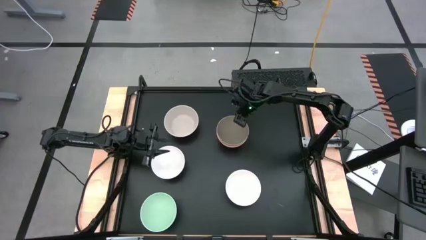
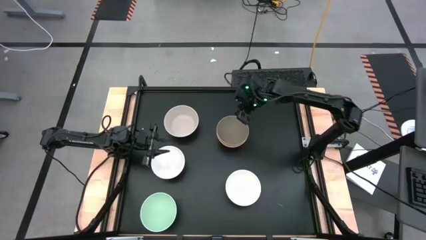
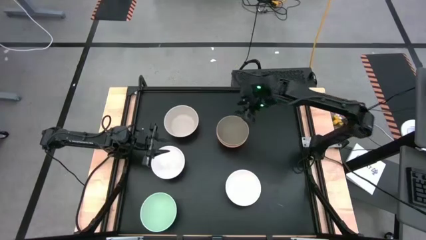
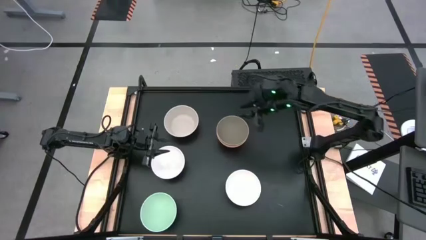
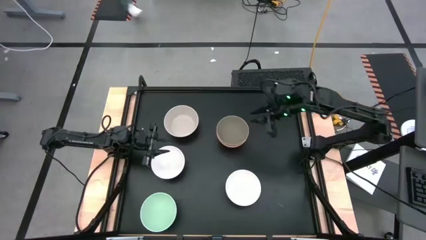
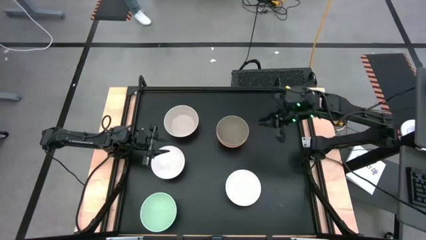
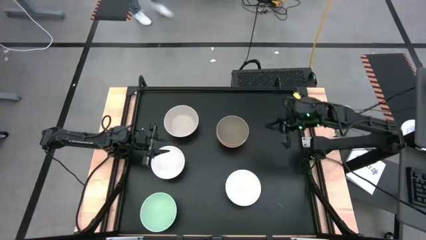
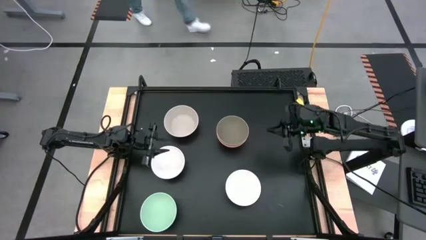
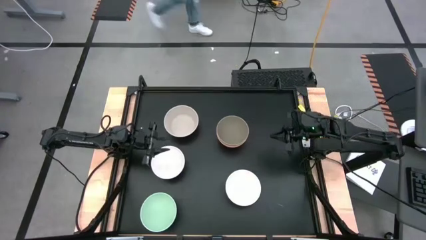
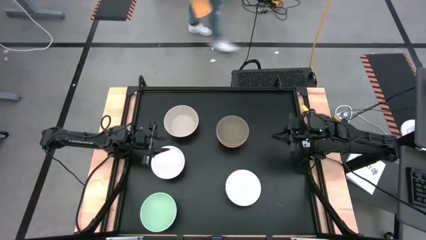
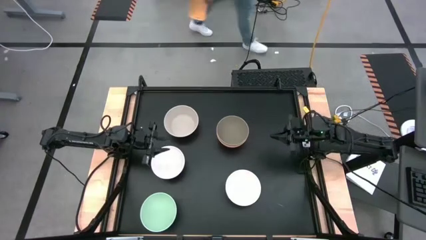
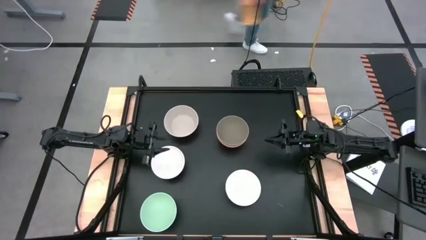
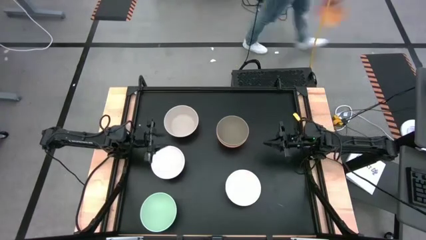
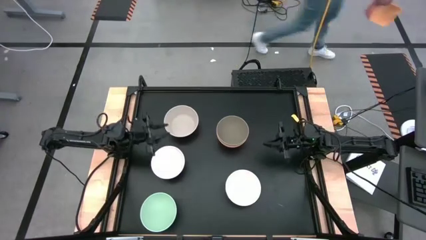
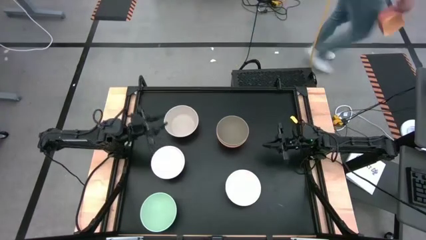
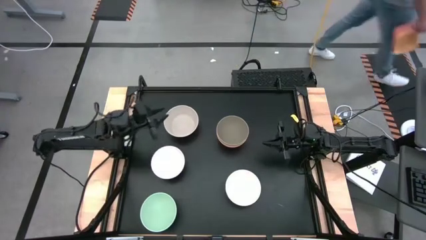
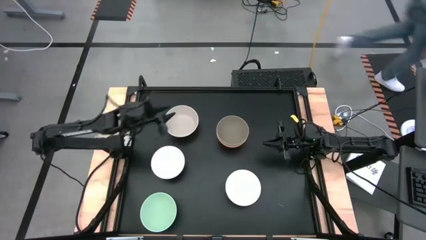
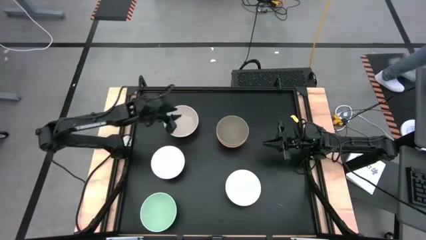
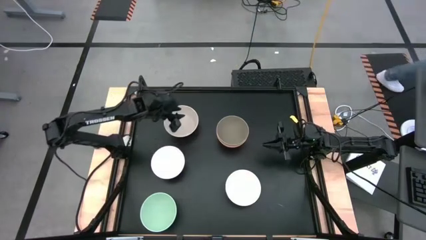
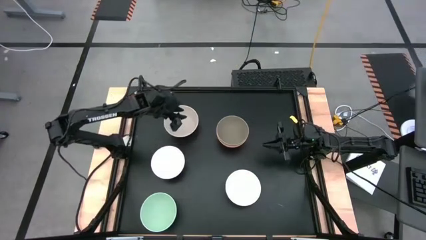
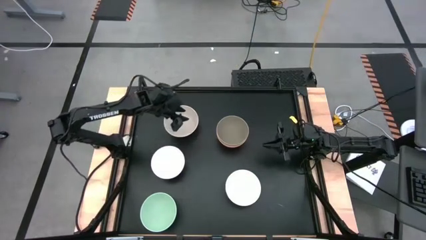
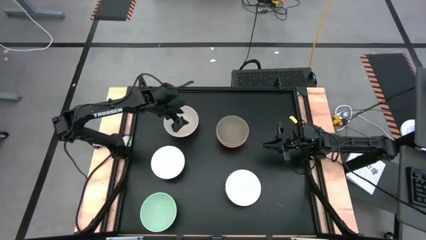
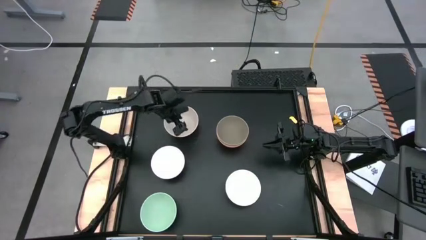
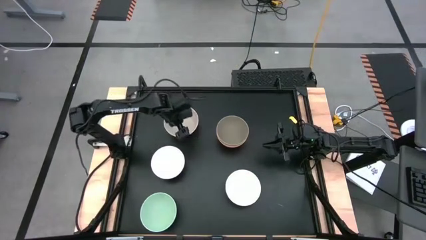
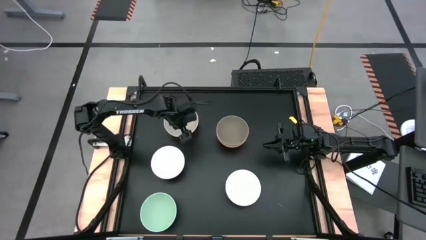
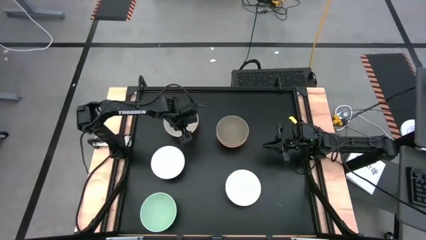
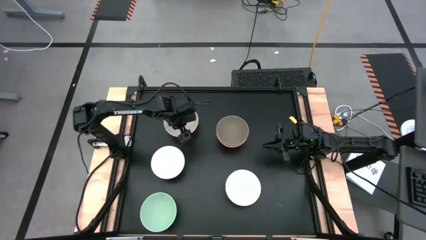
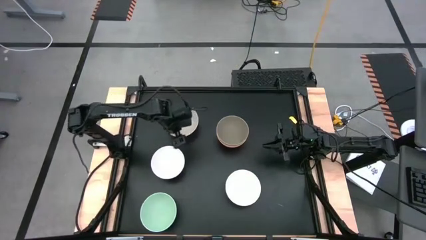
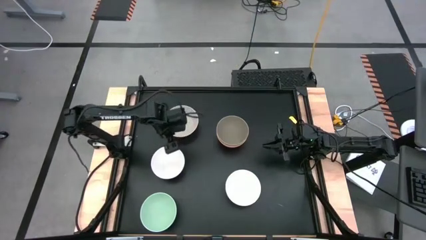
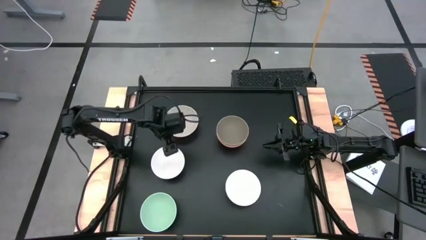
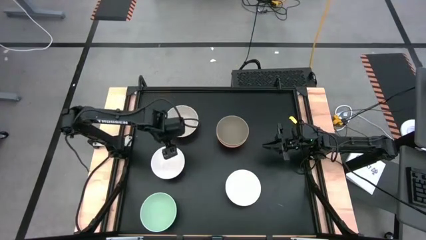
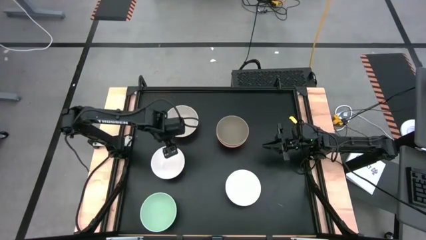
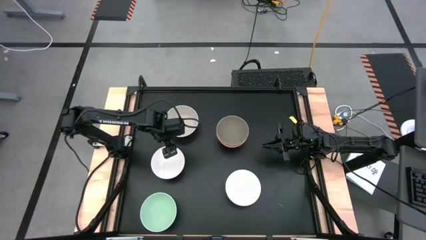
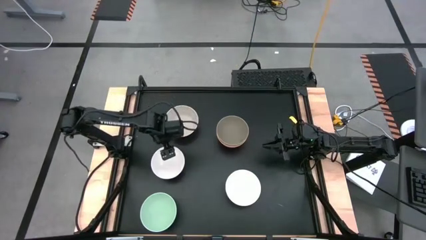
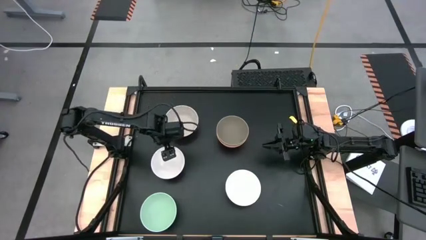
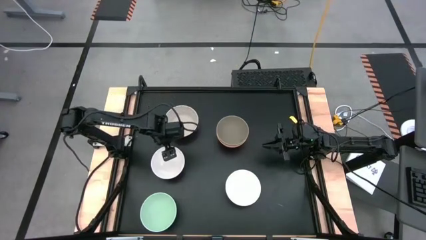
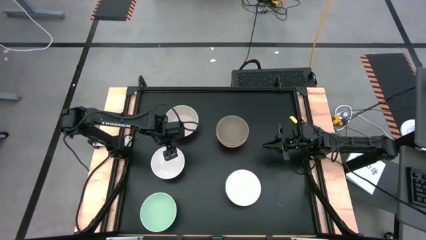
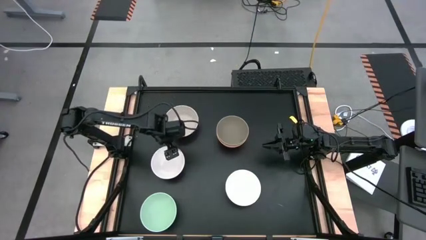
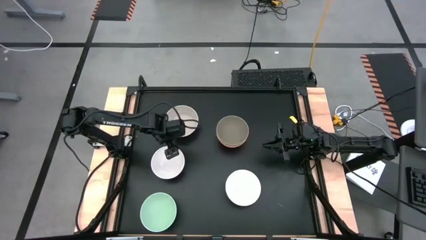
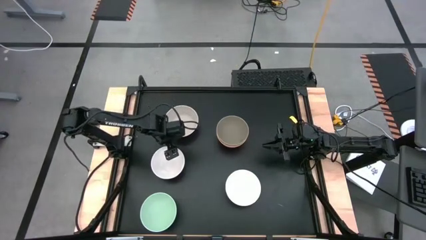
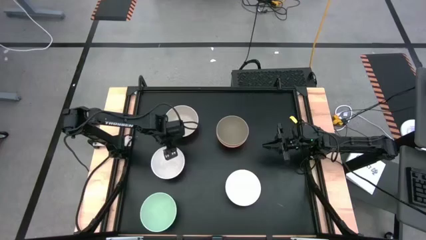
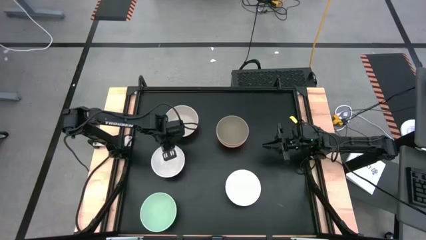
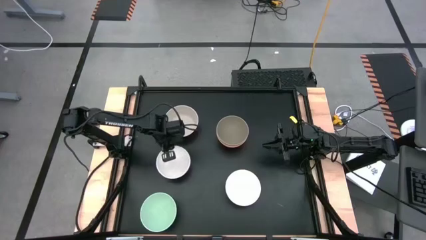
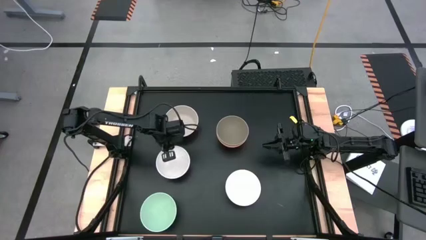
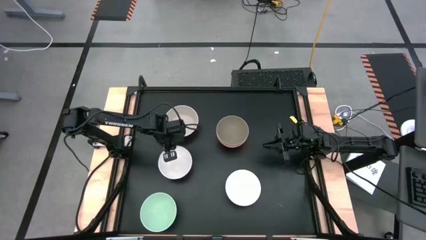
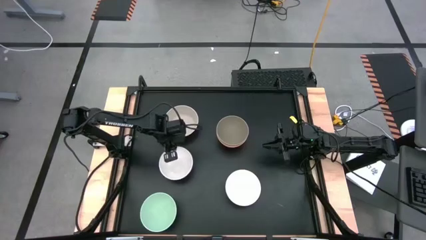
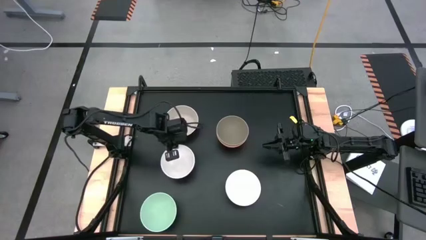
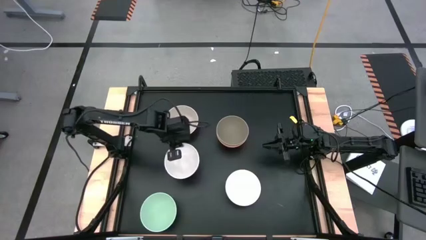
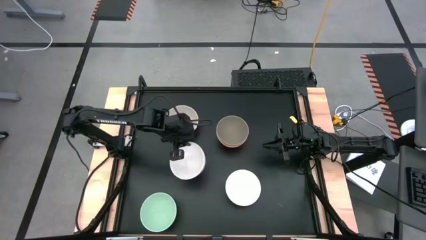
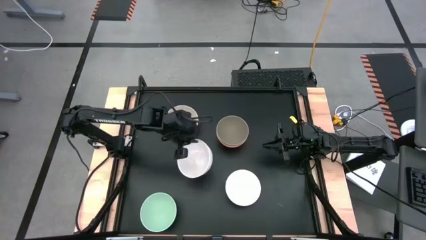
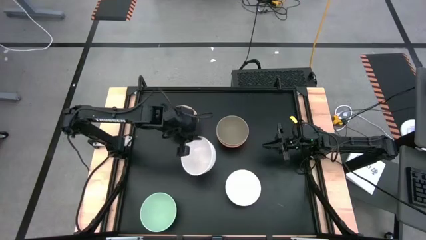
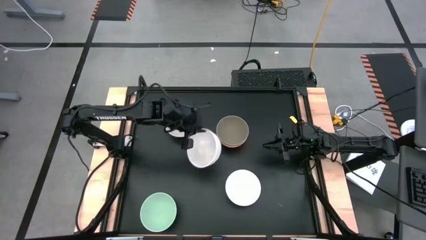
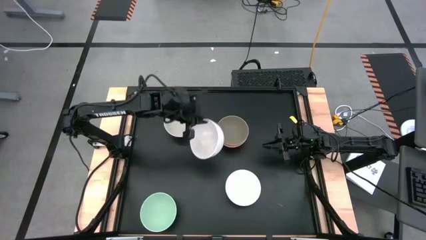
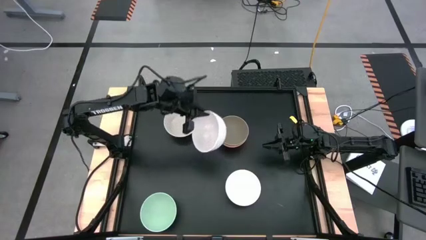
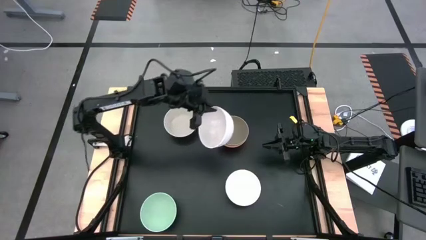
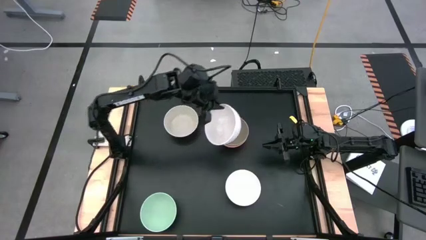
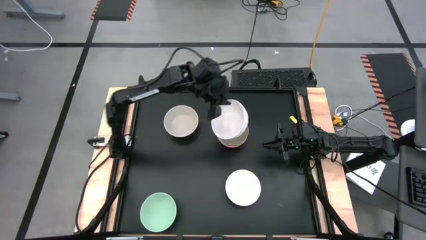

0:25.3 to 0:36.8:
Task: Nest bowls inside each other
Stack the left white bowl on top of the brown bowl

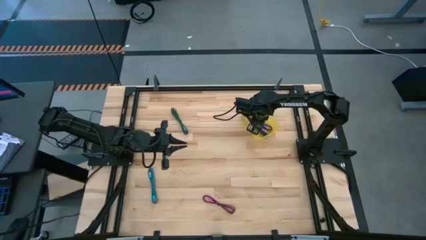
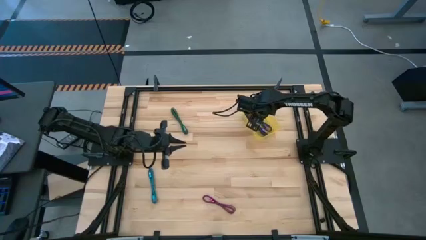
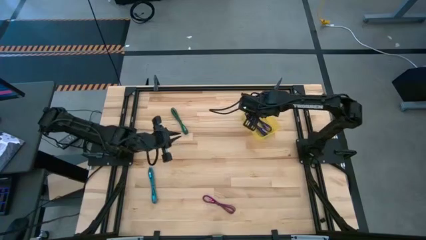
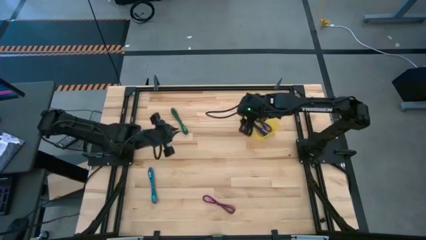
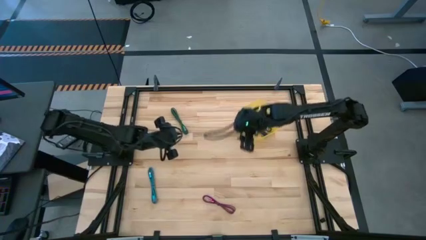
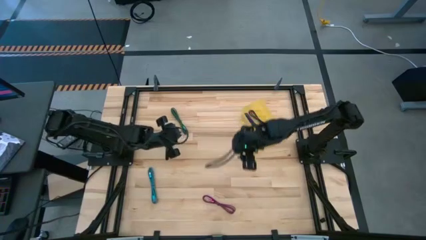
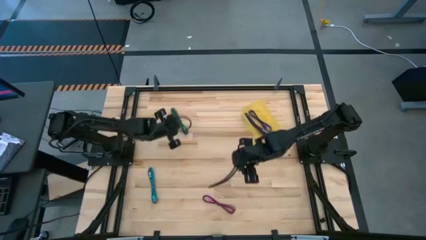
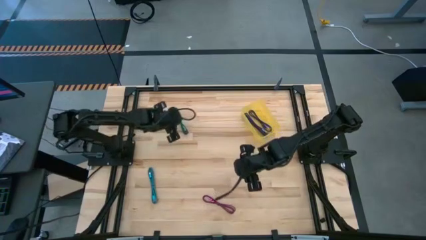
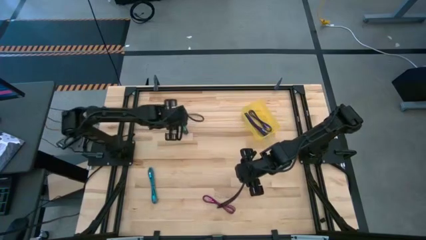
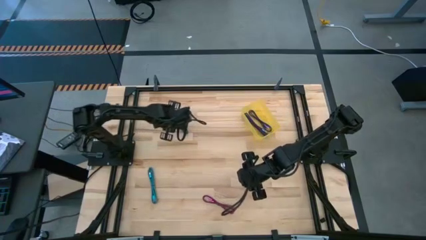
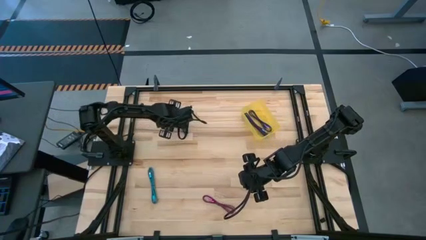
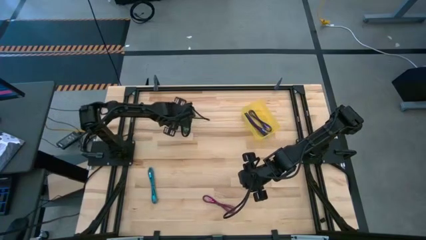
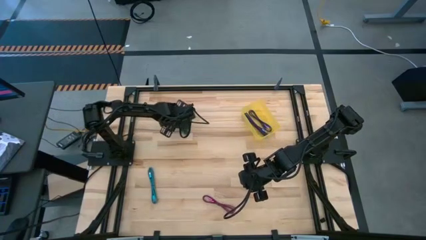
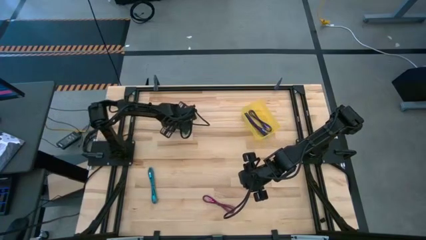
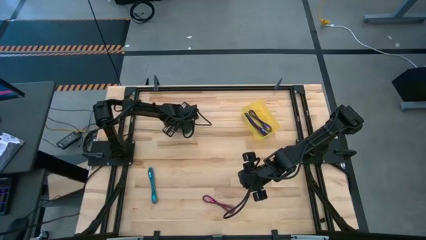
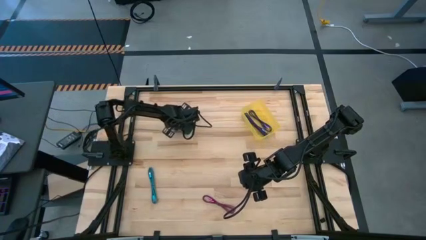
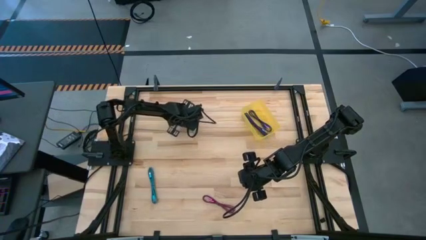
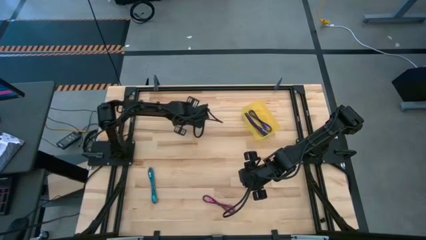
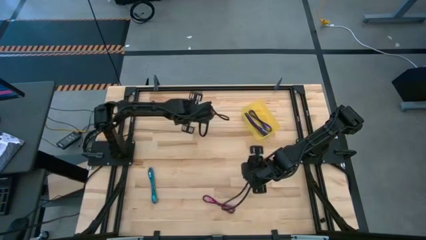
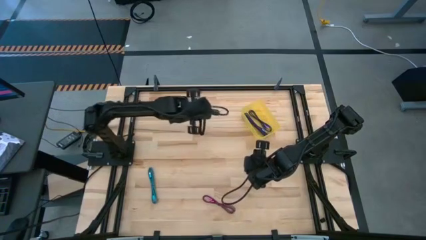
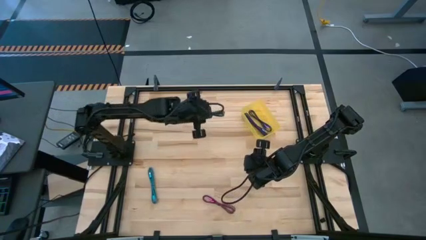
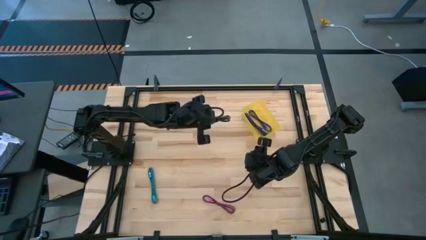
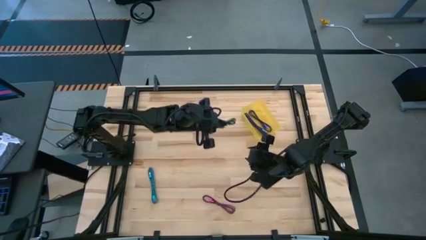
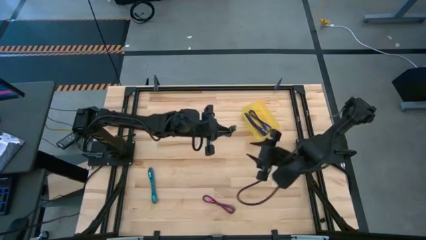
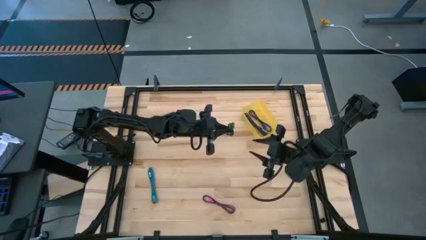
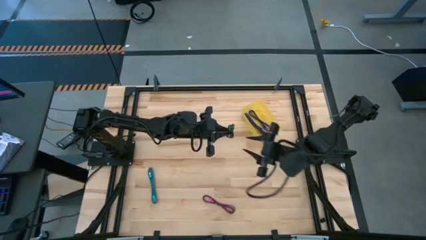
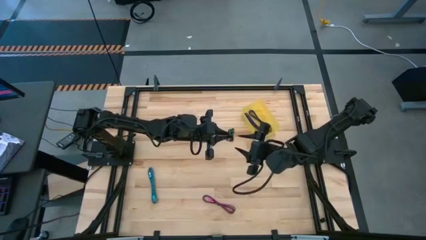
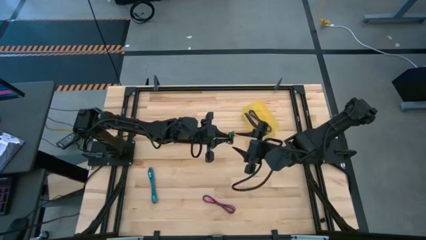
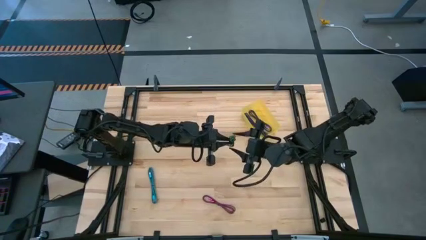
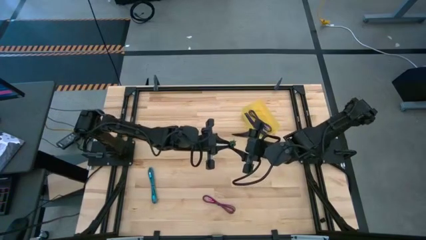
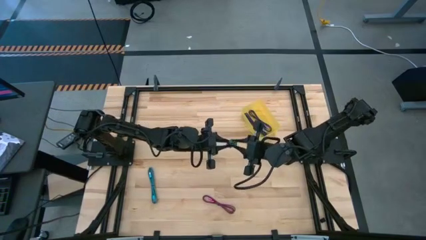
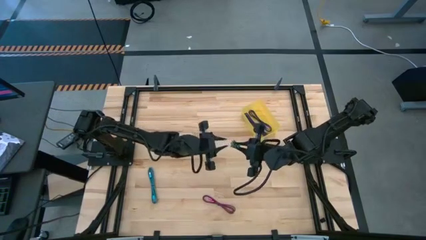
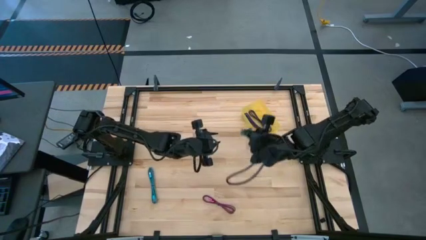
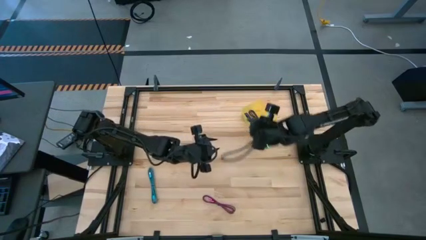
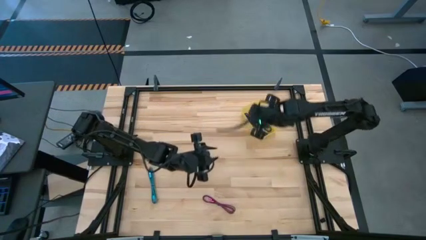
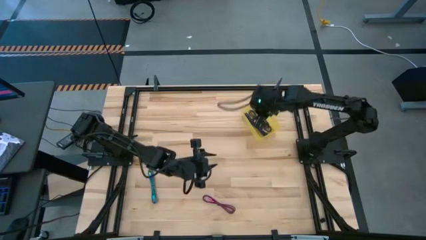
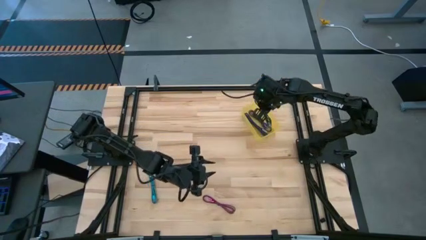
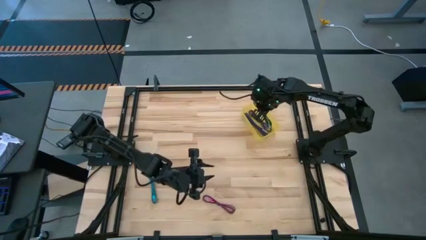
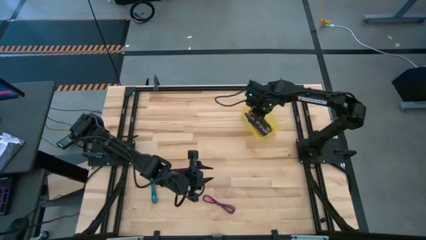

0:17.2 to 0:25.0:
Task: Pick and place USB-C Cables
Put the green and black charger cable into the yellow bin
